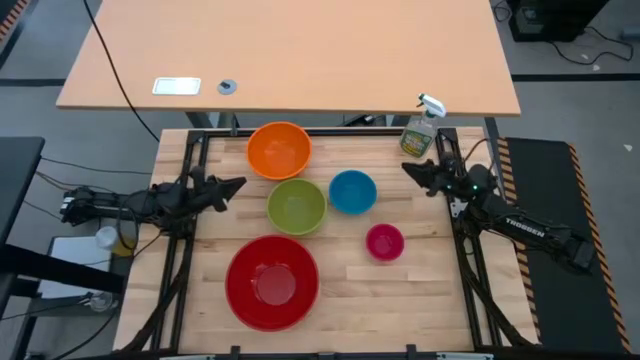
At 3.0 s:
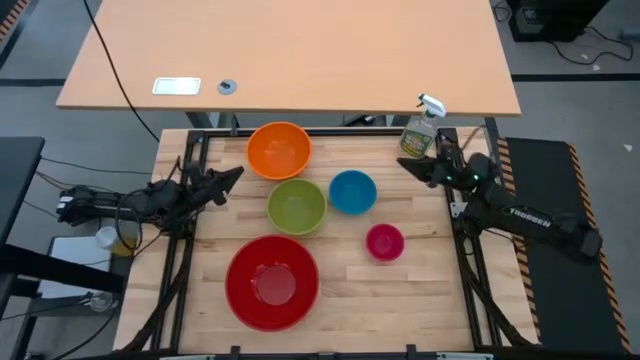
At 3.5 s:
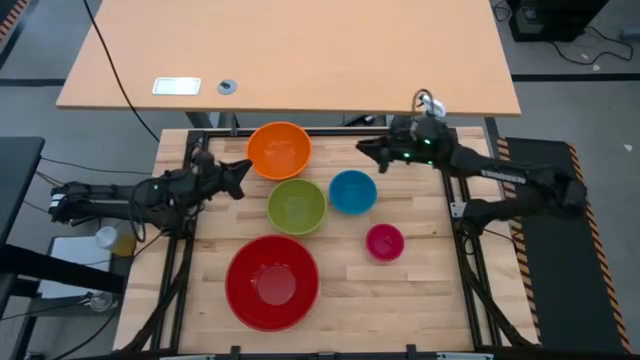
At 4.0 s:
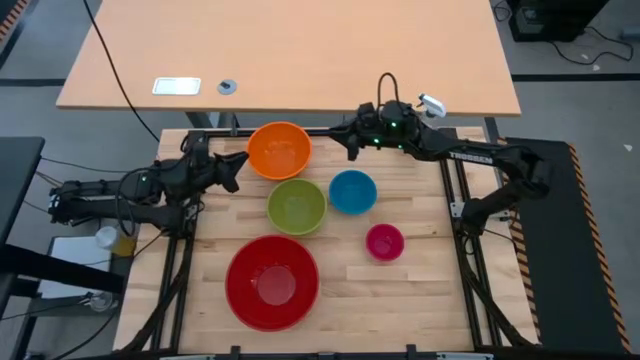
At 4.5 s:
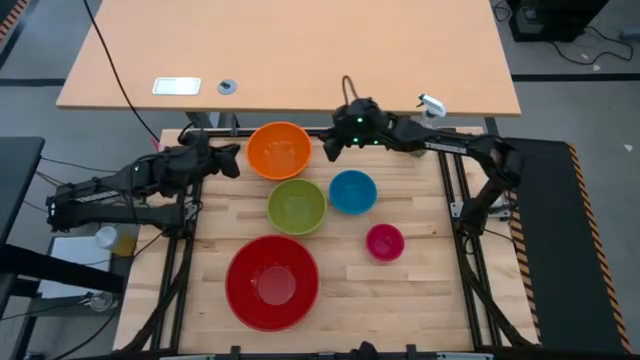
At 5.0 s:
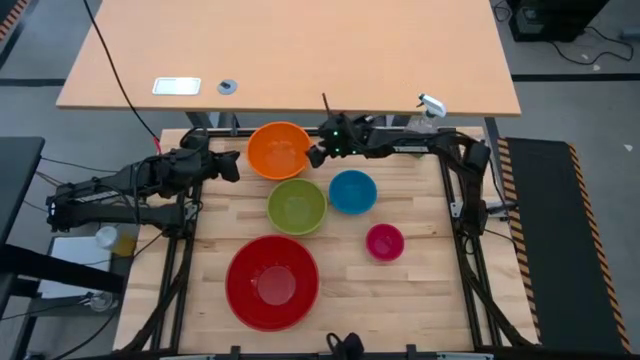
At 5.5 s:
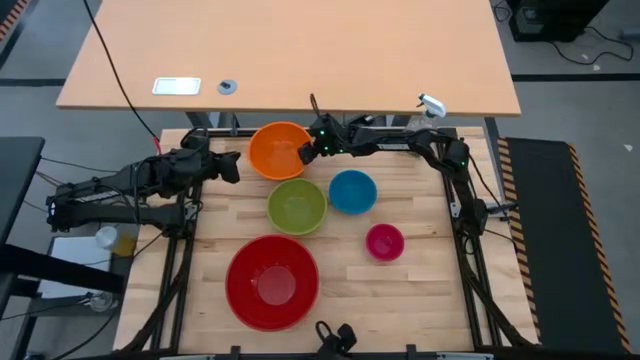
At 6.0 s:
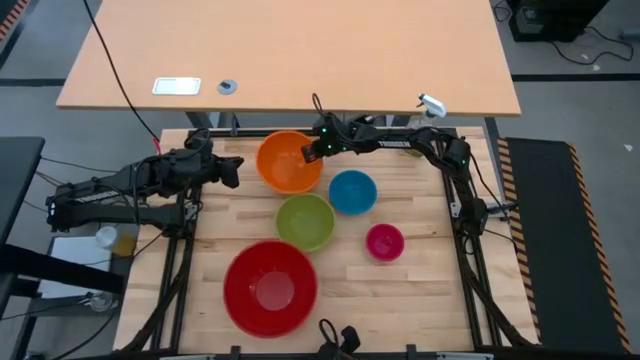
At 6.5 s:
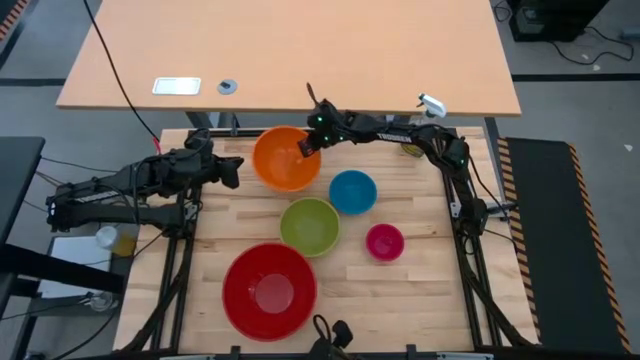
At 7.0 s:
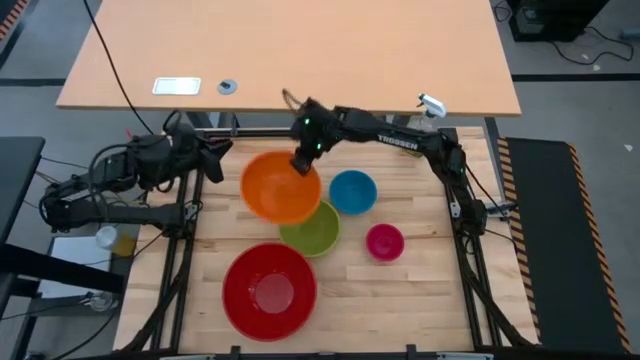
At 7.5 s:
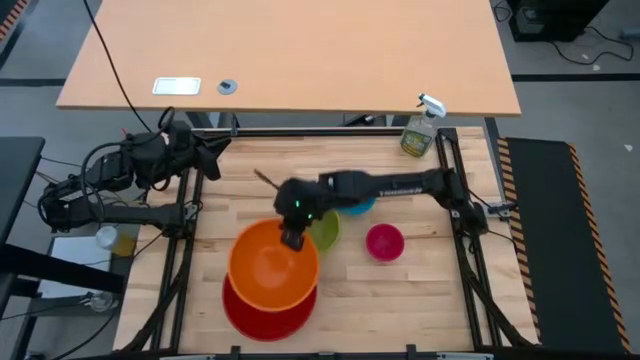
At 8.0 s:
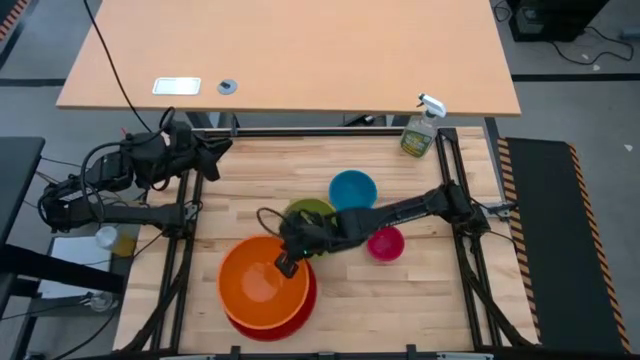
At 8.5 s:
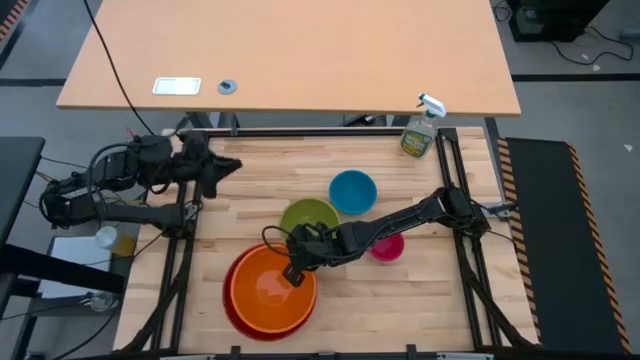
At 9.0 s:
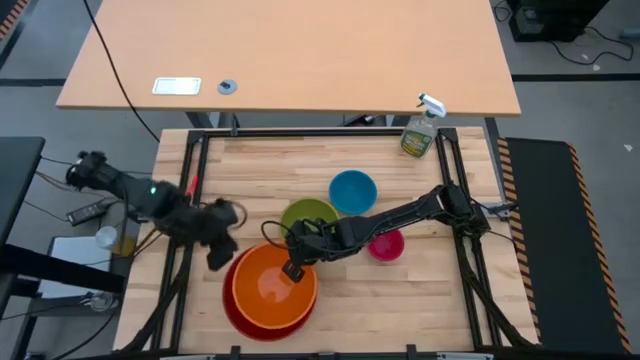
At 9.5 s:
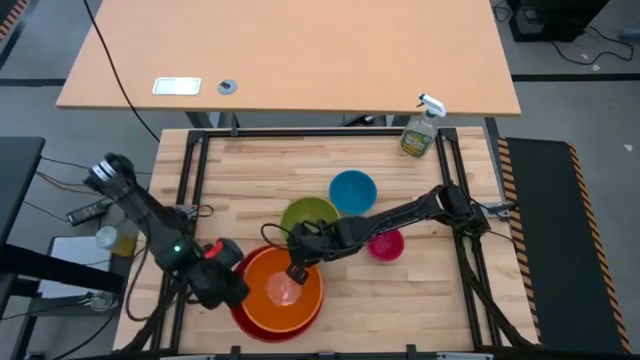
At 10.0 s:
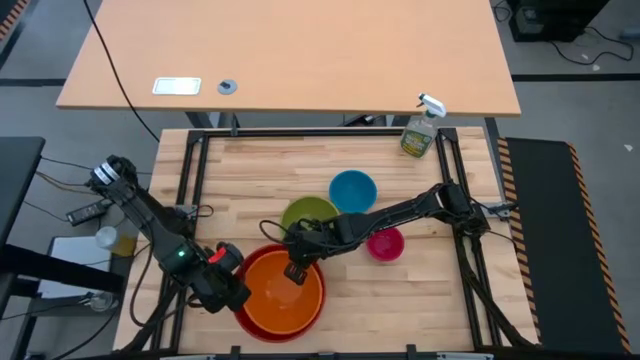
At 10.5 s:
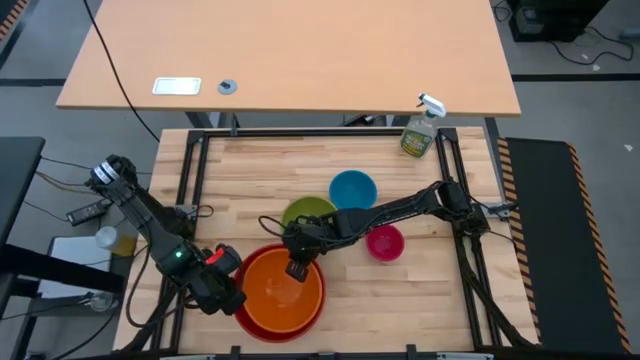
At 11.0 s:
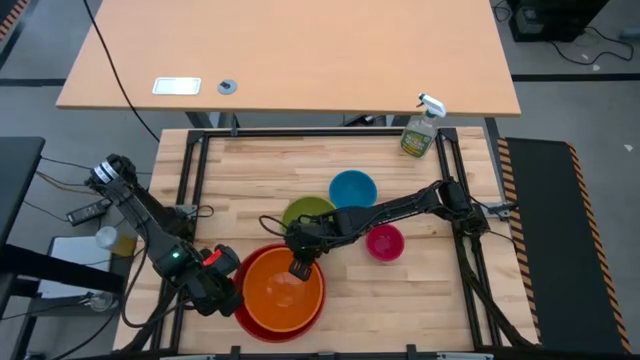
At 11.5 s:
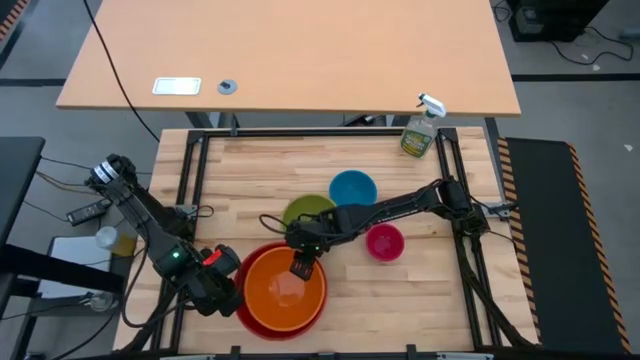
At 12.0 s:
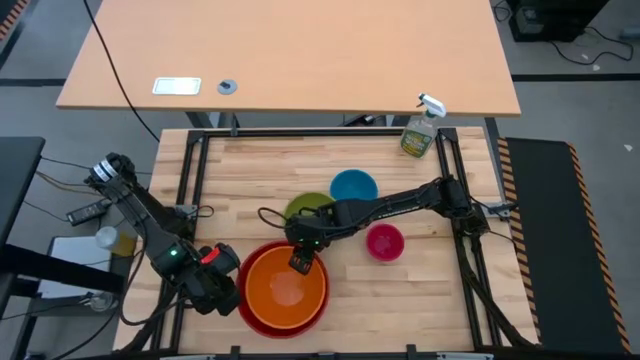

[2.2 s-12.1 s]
Stack the orange bowl on top of the red bowl

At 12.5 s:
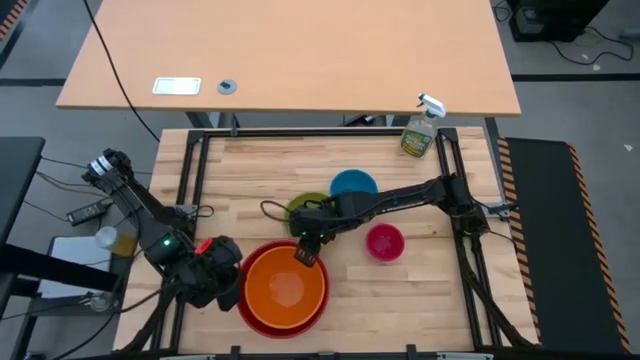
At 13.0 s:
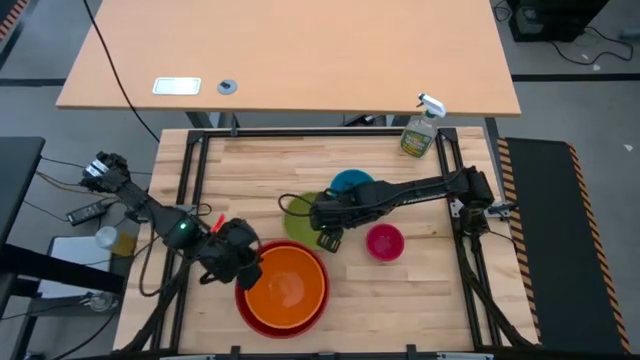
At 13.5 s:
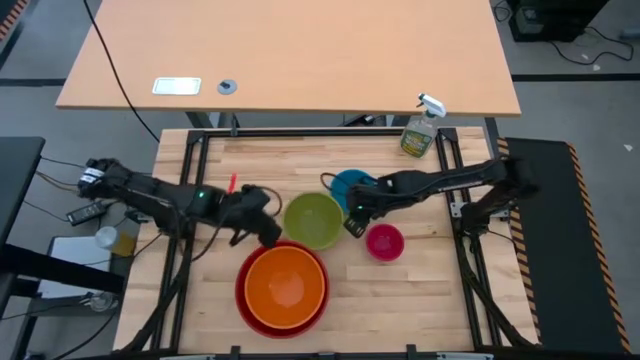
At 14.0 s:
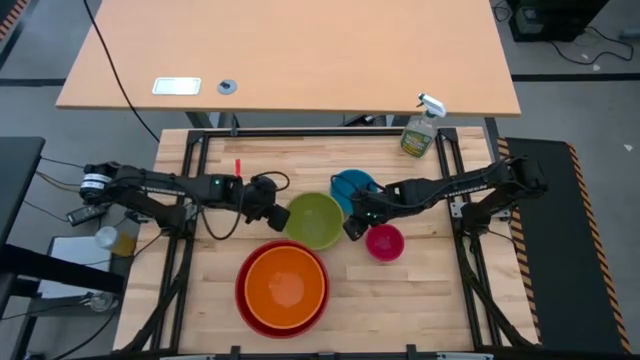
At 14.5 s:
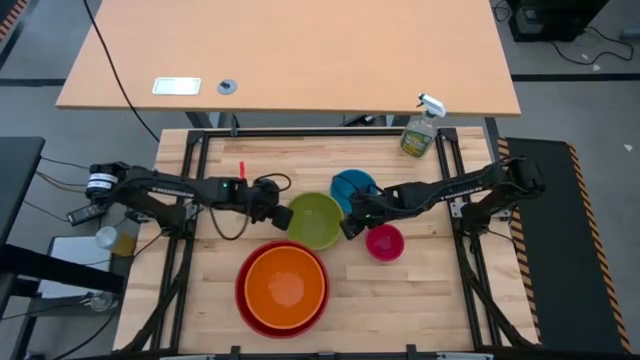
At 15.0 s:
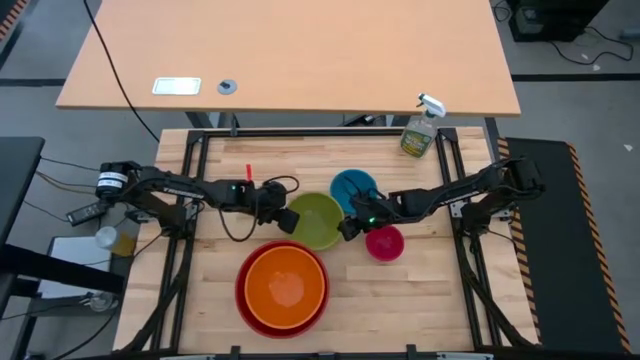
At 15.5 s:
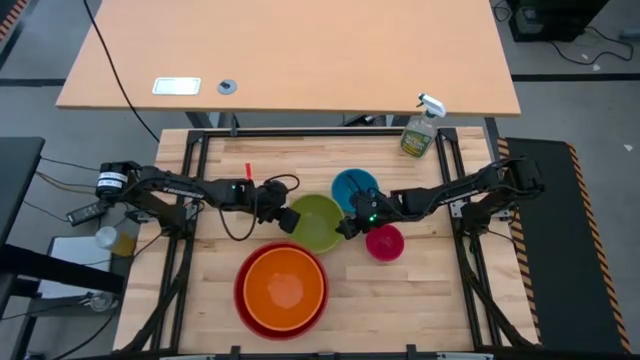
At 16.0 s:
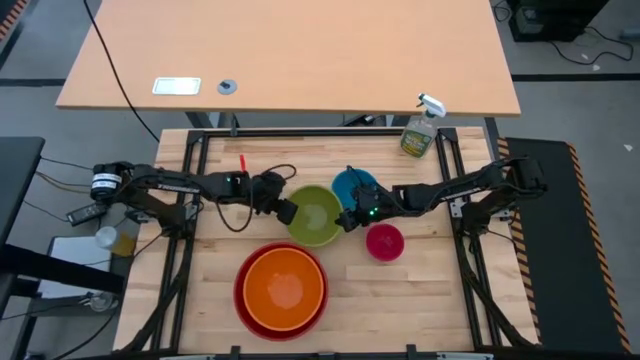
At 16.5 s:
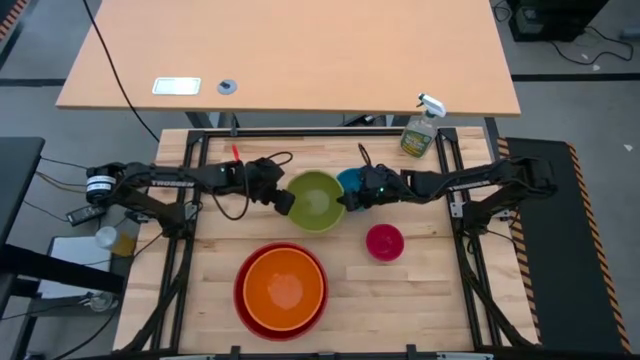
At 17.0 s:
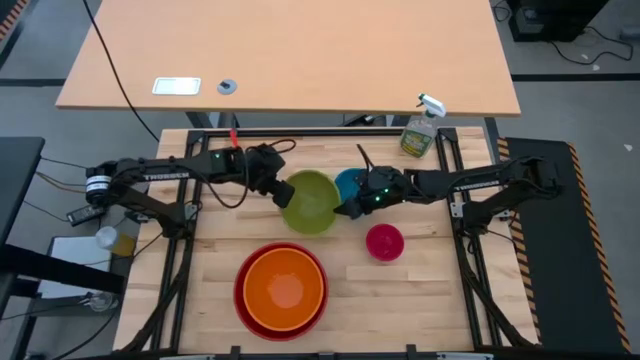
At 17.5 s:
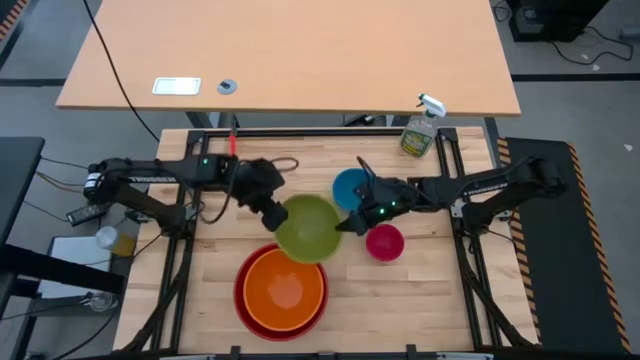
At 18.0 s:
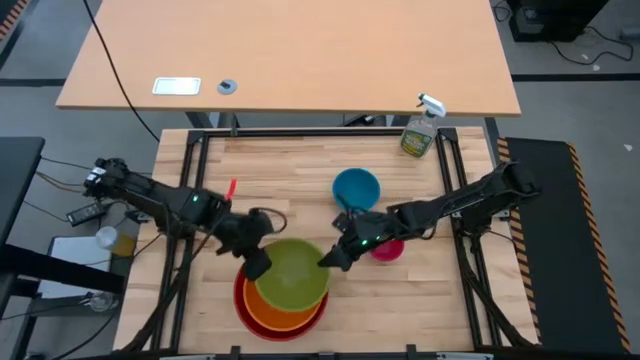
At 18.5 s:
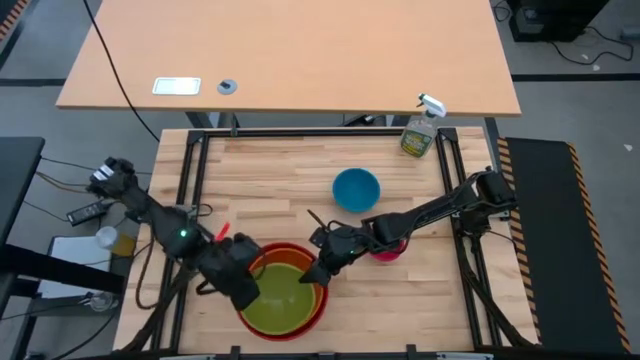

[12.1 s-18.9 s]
Stack the green bowl on top of the orange bowl

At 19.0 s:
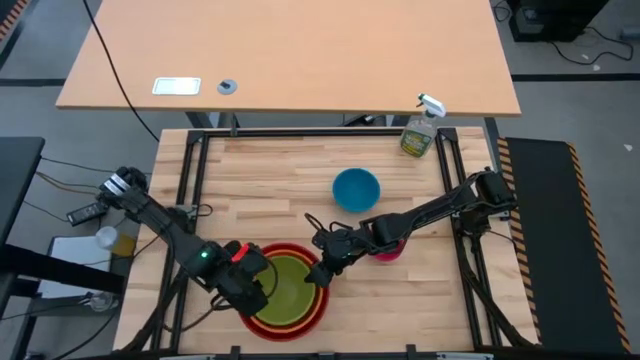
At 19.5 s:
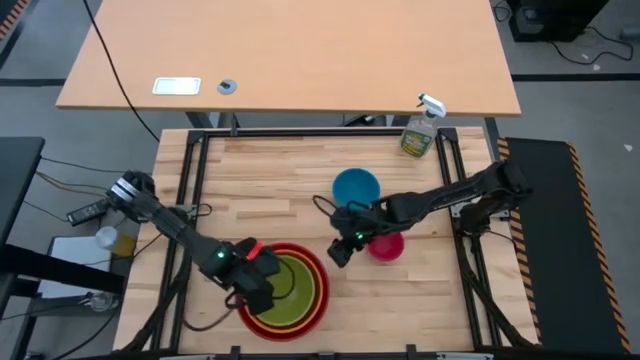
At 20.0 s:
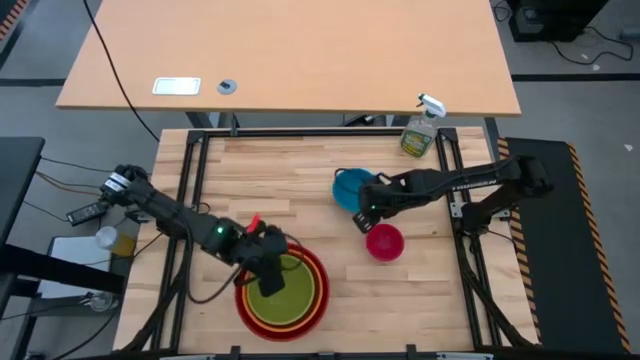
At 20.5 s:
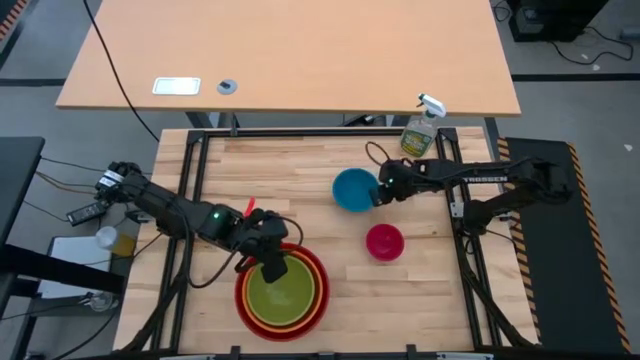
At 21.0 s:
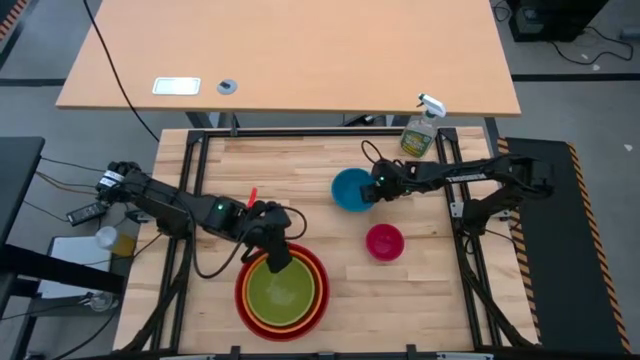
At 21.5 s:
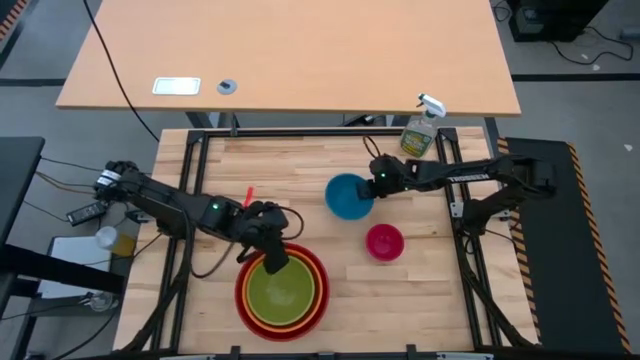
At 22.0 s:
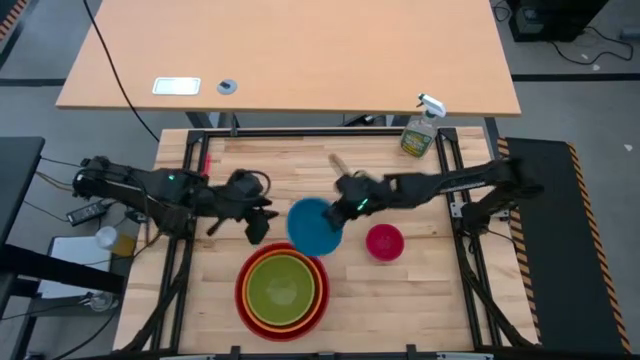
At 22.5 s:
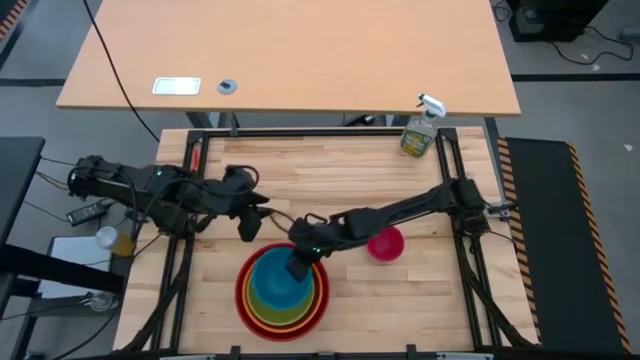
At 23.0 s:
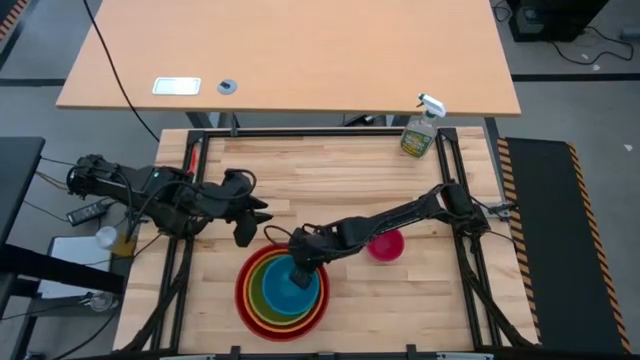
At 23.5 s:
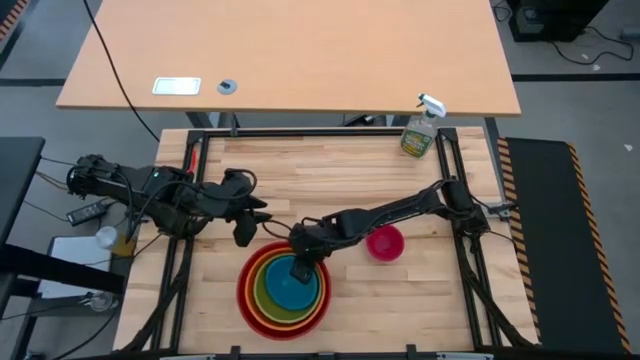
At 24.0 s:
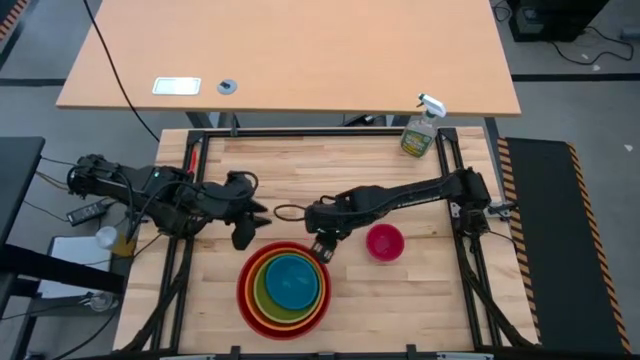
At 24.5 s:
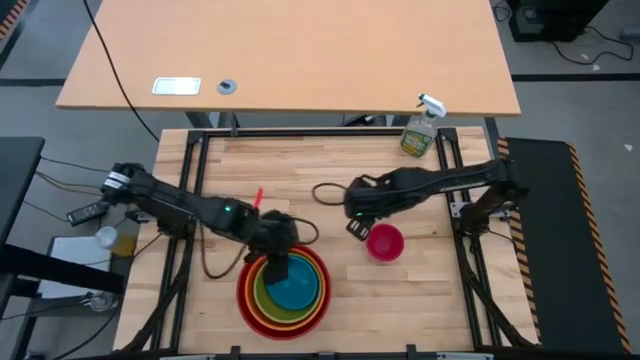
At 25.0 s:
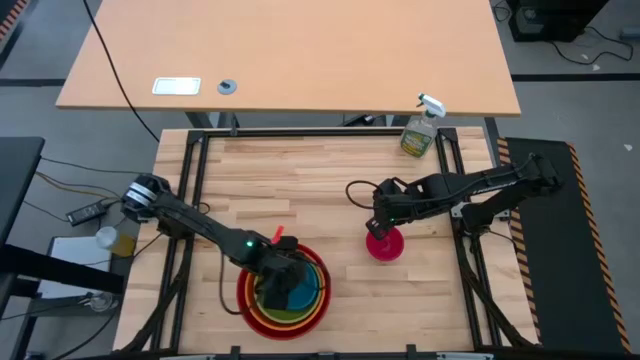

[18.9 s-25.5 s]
Stack the blue bowl on top of the green bowl
